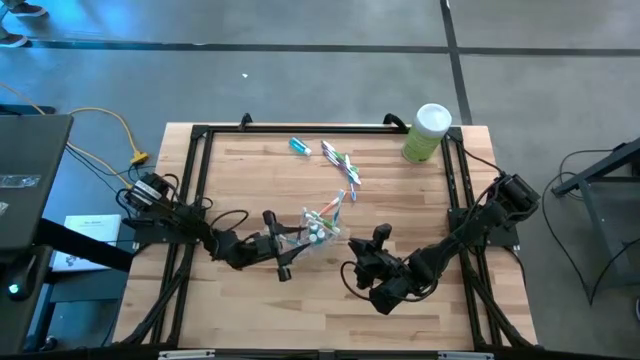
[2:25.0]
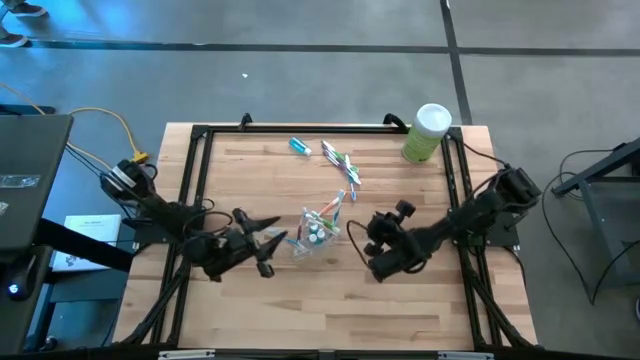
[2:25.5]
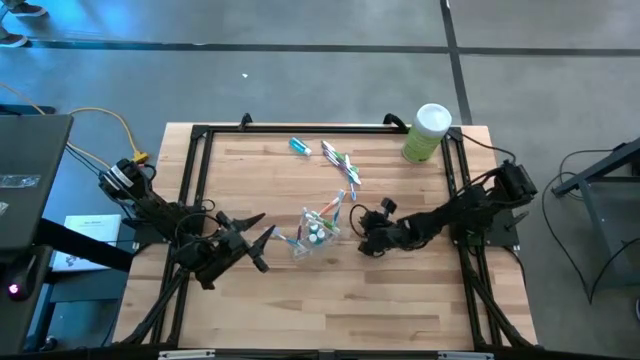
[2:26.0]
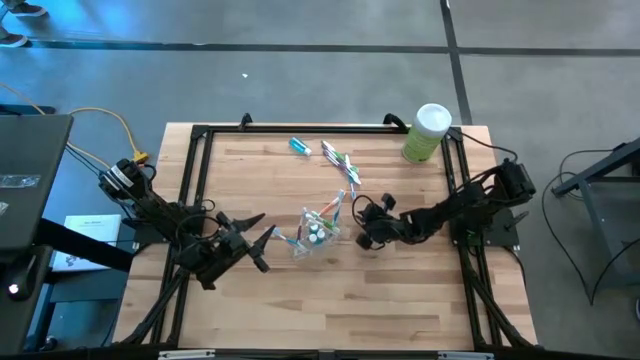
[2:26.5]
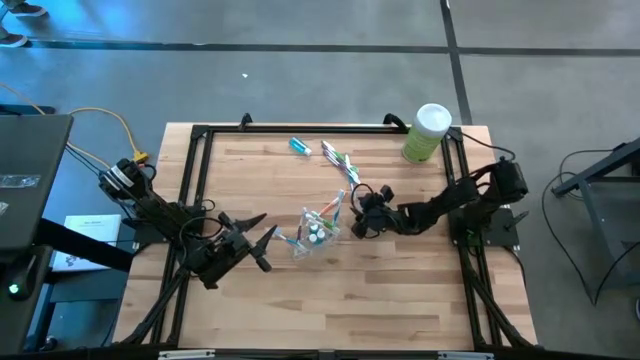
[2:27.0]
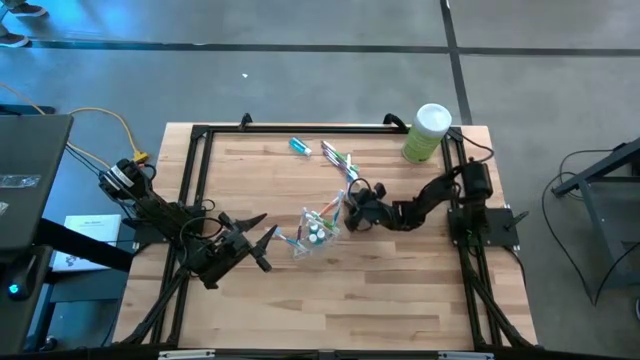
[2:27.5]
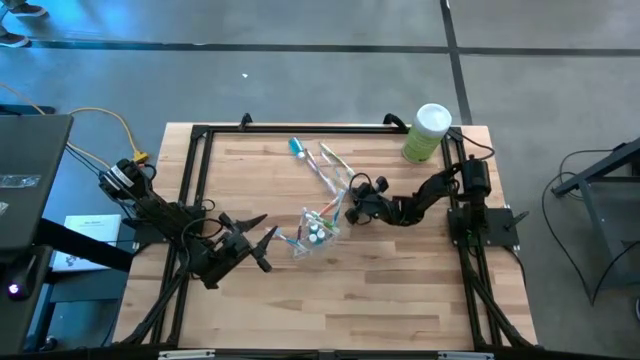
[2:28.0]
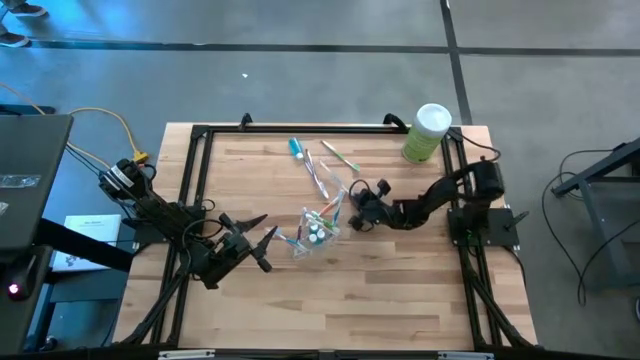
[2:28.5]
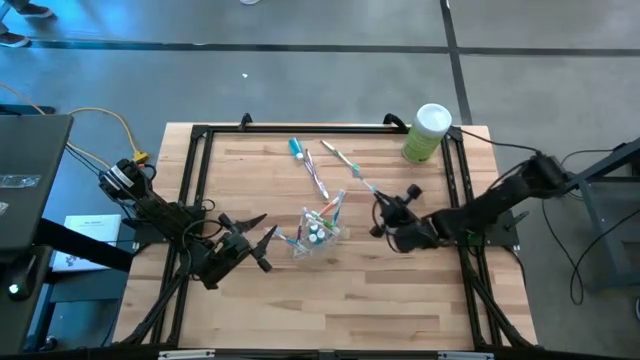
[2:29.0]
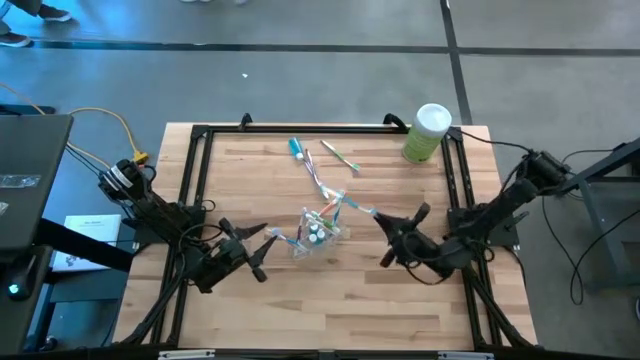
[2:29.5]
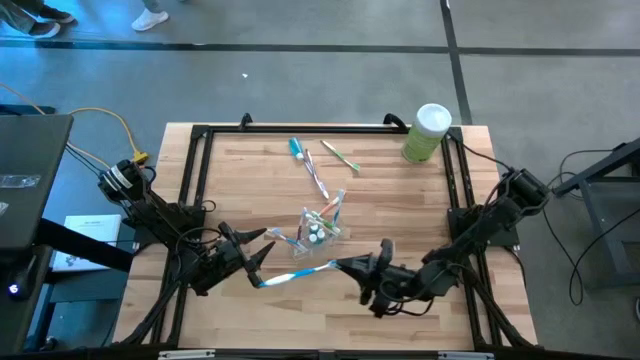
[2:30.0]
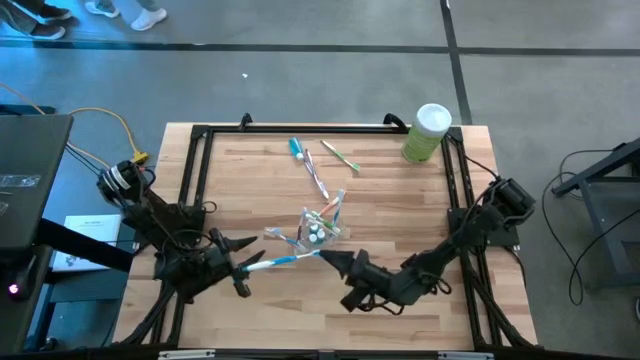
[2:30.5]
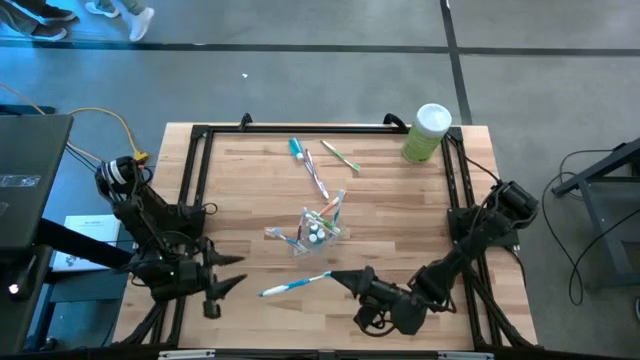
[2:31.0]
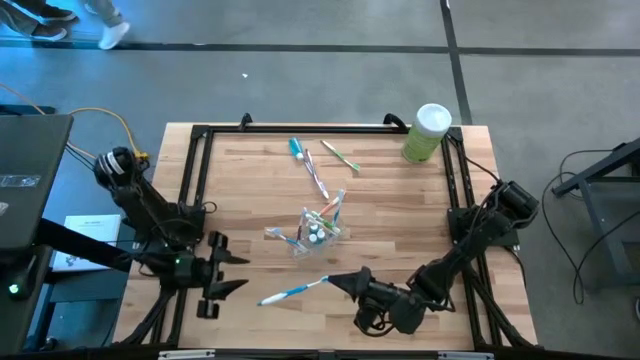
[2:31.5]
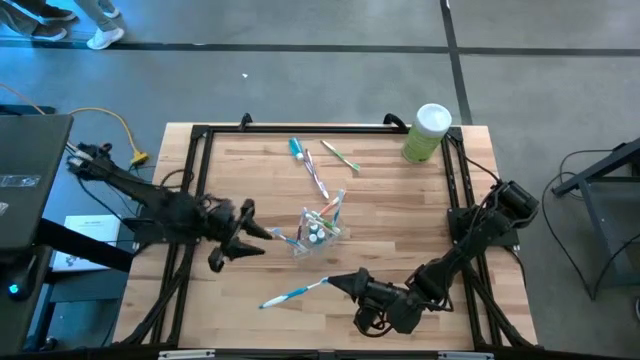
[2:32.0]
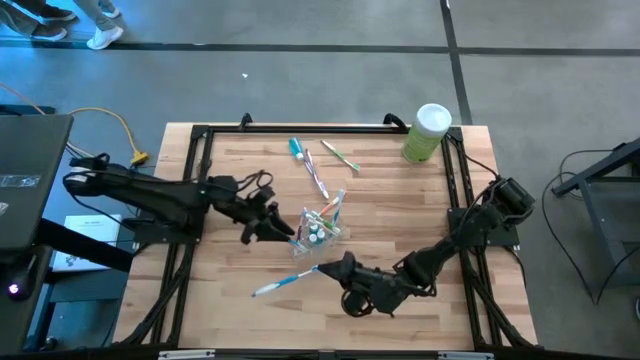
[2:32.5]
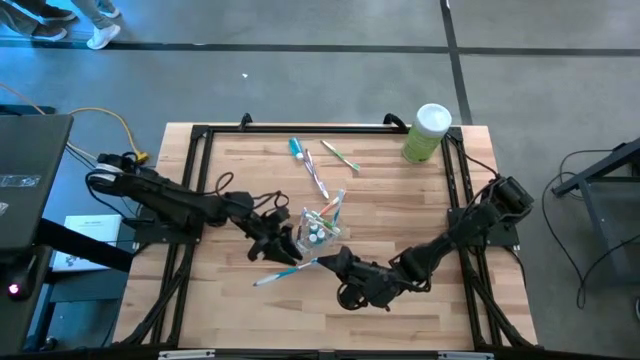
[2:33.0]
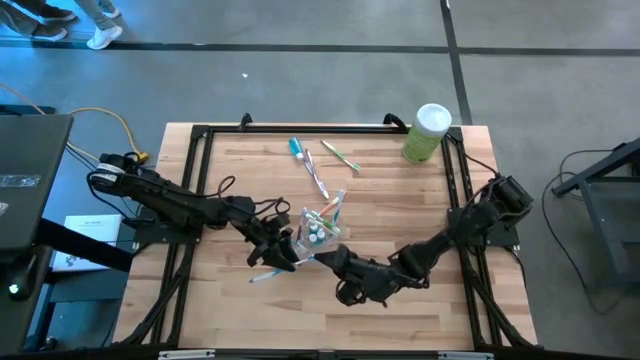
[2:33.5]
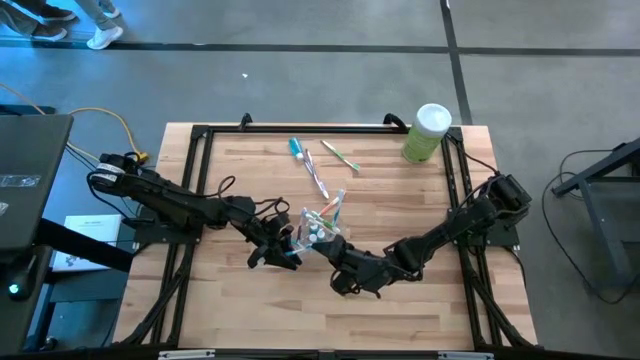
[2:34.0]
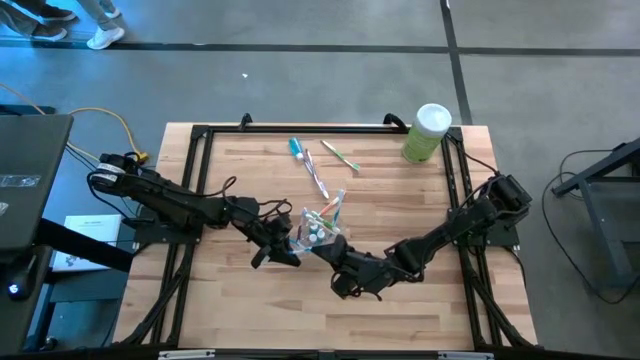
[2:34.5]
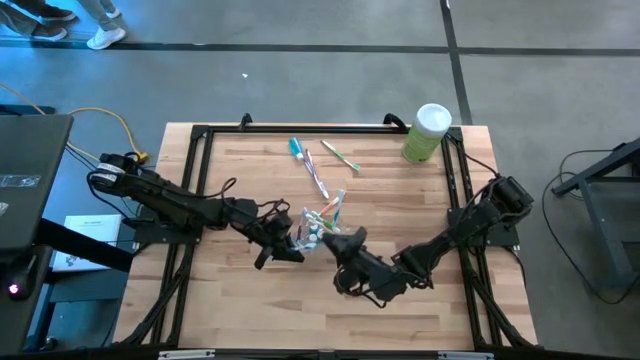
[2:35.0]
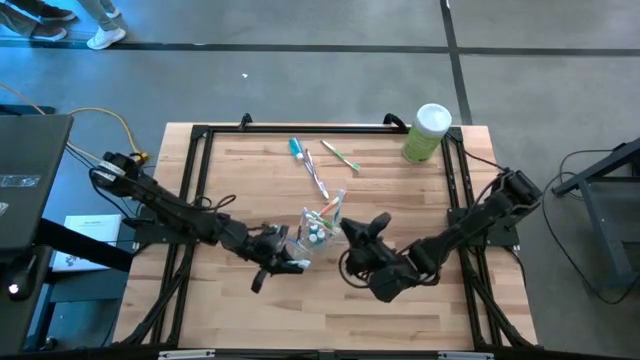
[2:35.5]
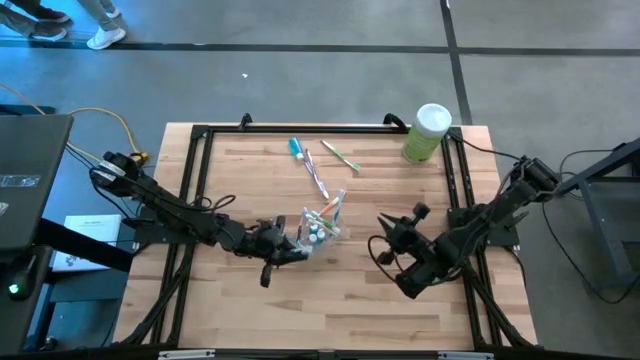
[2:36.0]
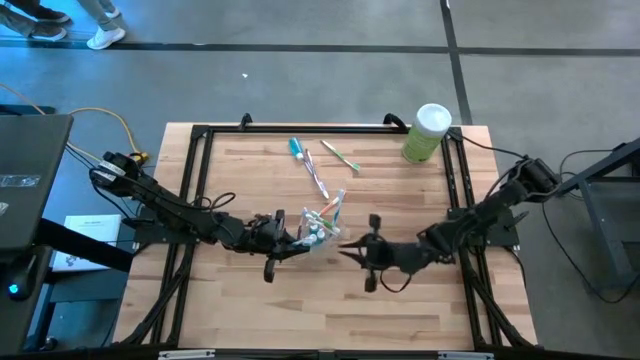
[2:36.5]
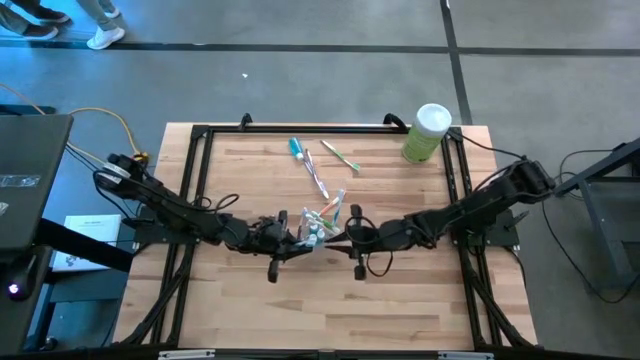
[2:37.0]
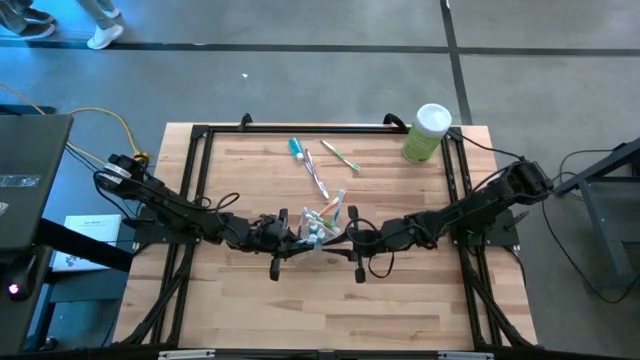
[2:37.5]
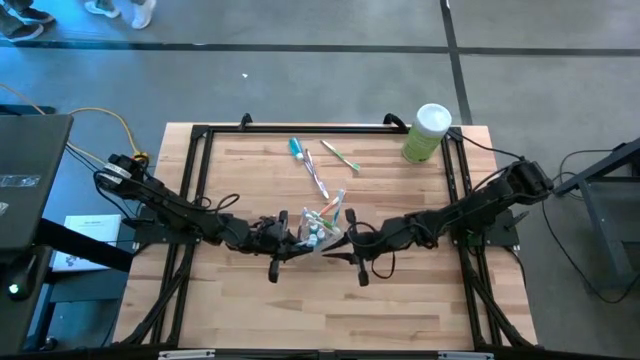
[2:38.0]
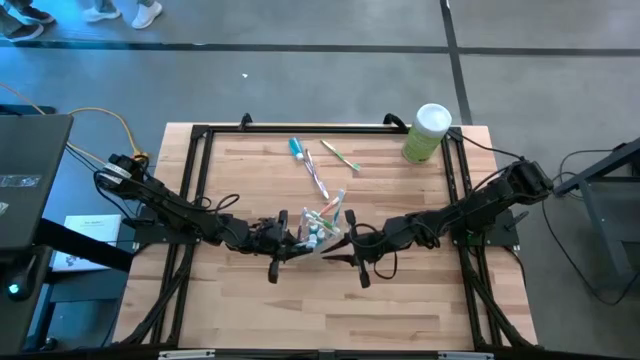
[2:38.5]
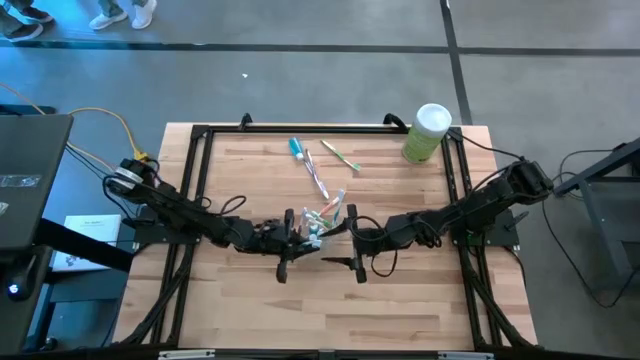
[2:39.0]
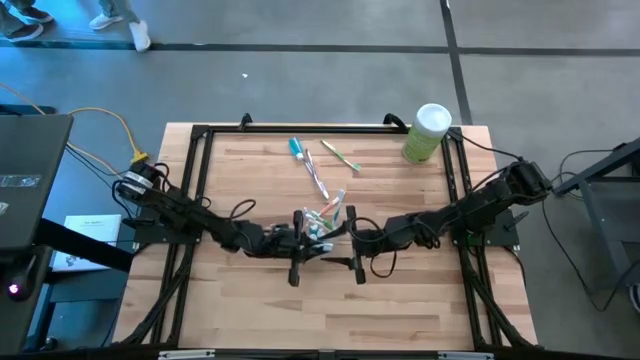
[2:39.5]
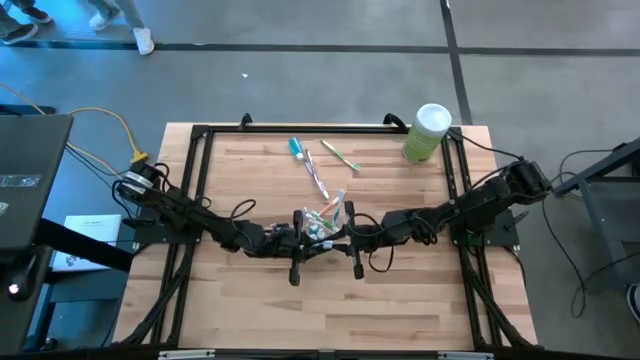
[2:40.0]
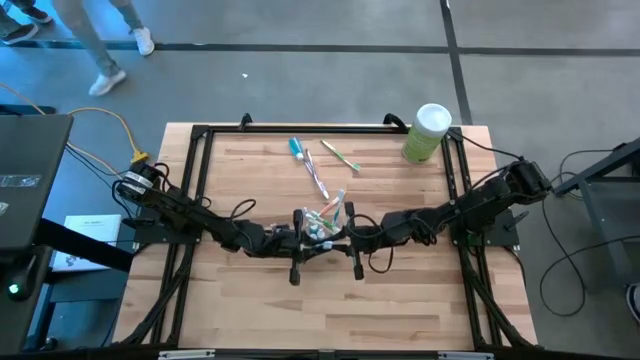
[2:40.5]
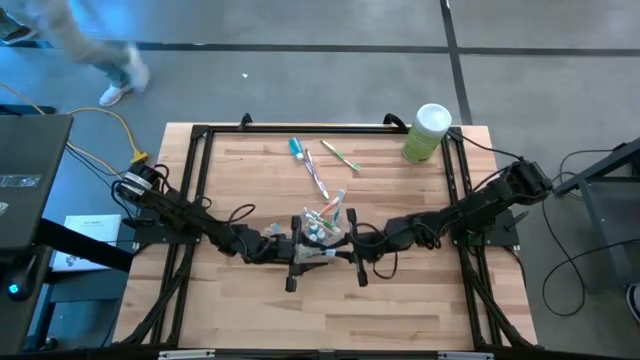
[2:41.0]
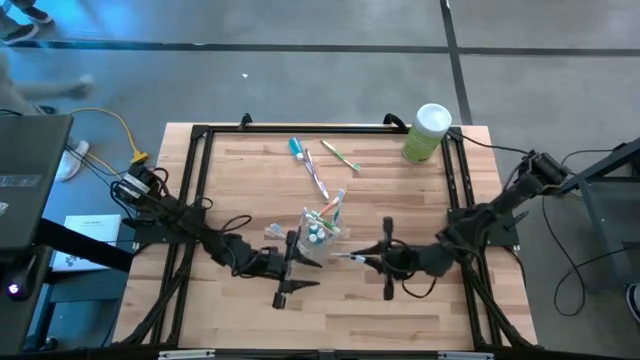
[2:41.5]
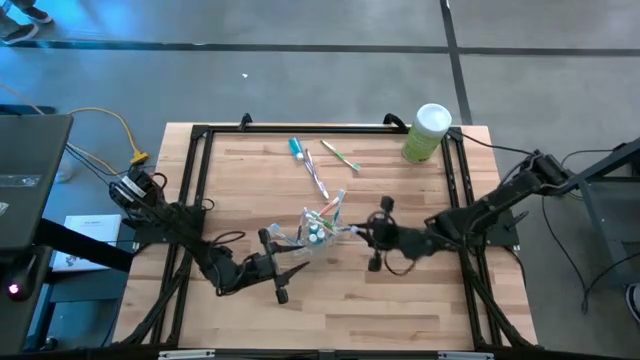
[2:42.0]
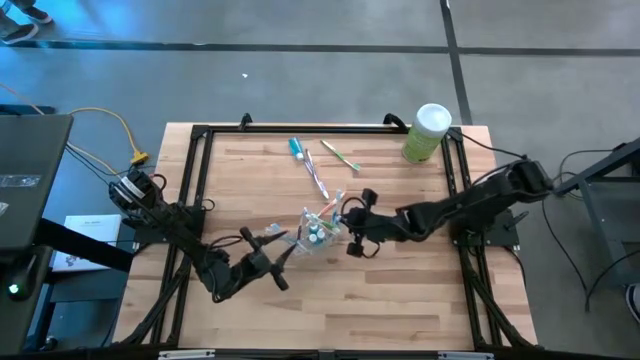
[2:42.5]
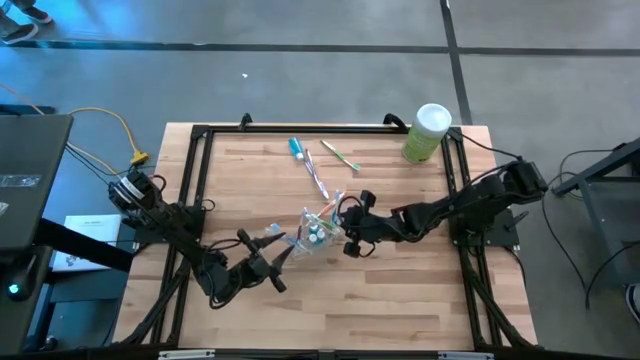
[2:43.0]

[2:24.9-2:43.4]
Task: Pick & Place toothbrushing station
Put the blue toothbrush into the transparent organizer

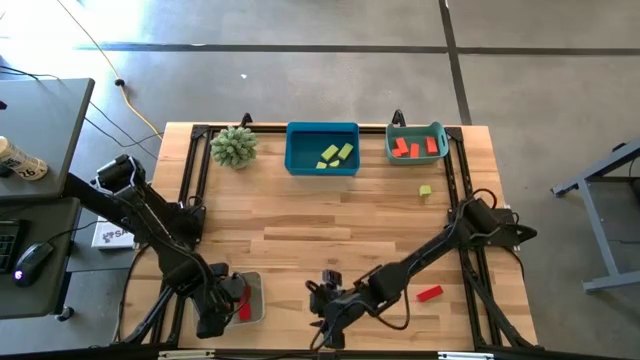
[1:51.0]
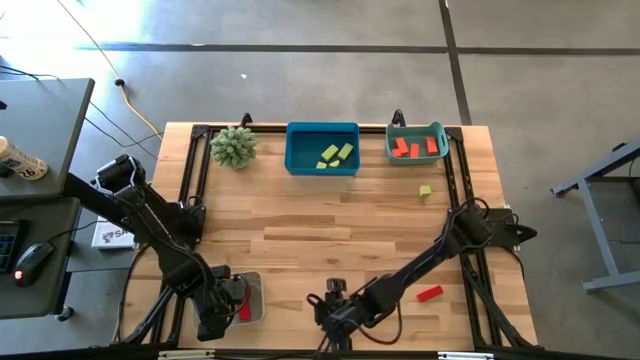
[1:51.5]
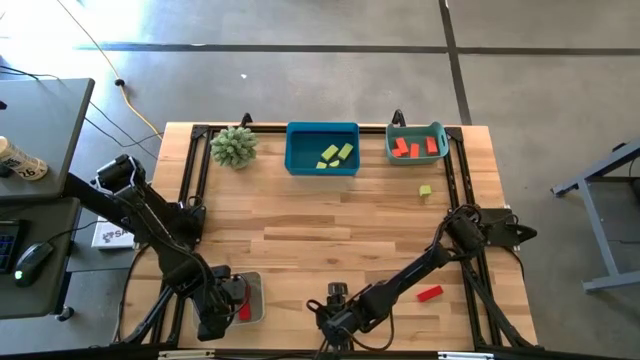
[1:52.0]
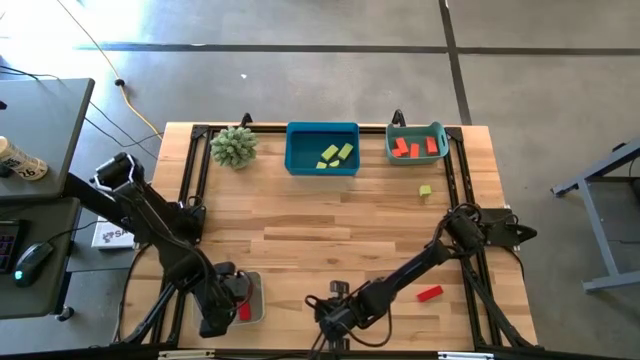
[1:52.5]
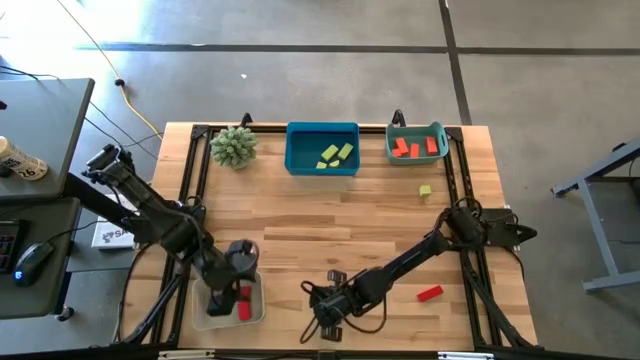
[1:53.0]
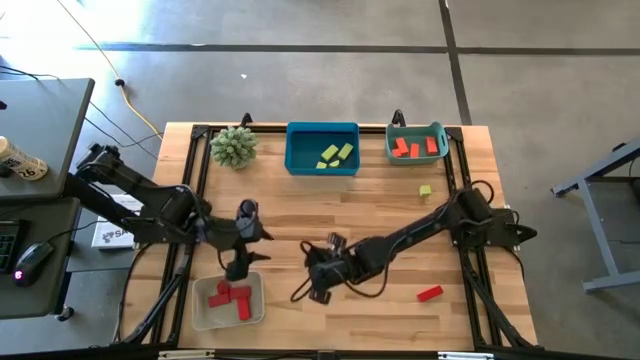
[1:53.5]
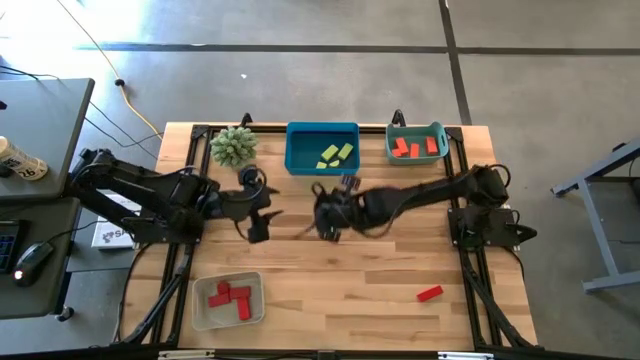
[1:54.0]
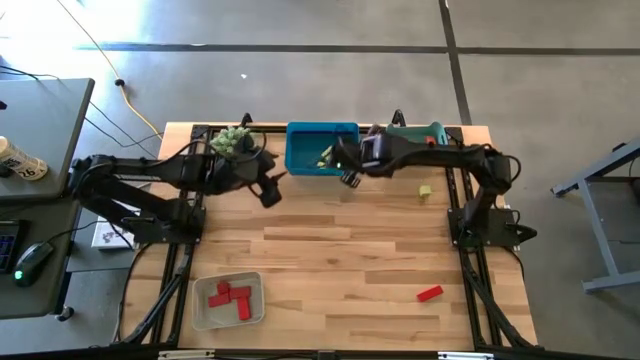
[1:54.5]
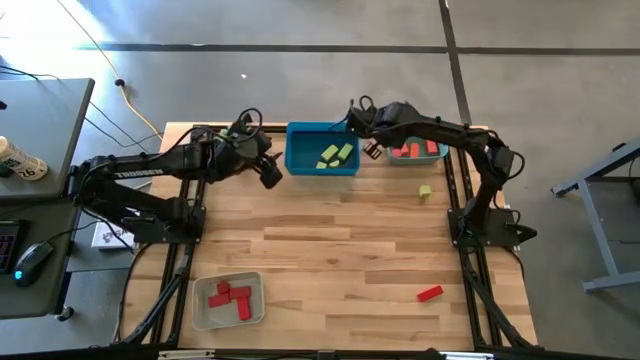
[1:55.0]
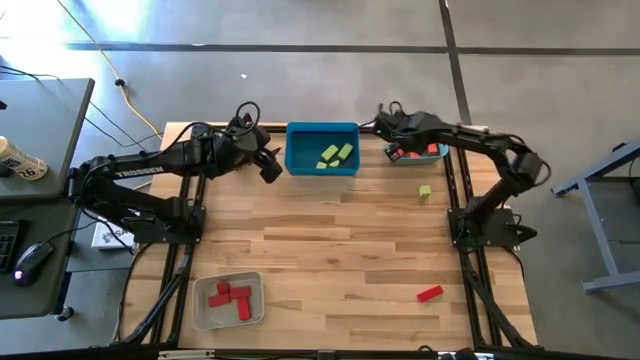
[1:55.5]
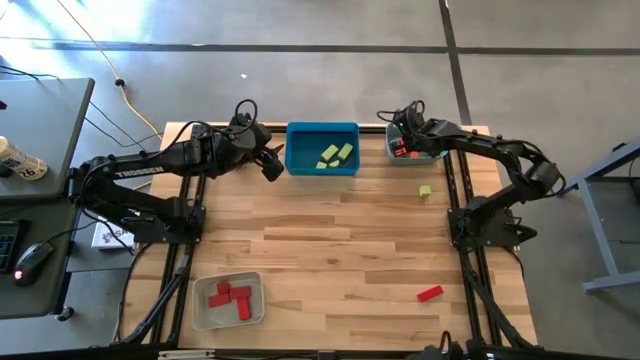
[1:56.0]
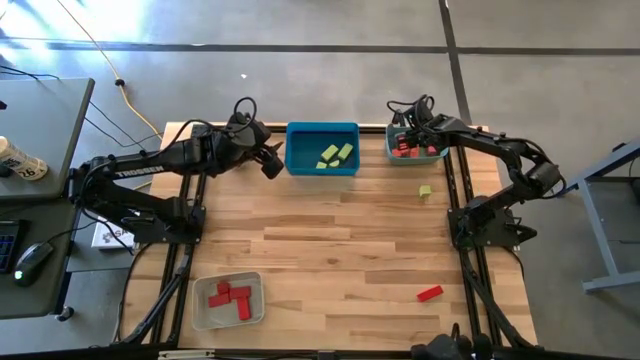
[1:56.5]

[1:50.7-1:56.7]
Task: Sort & place blocks by color
Put the orange block into the green bin
